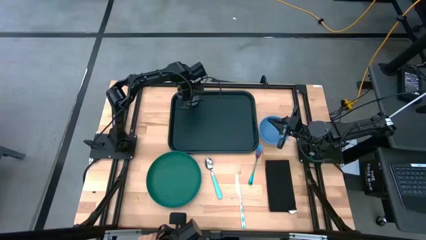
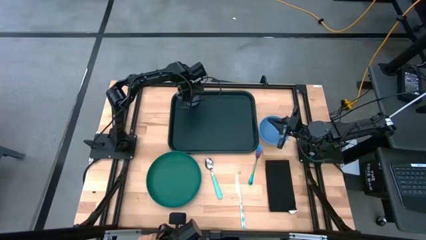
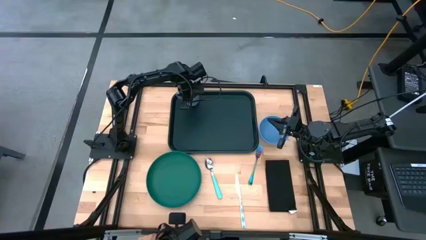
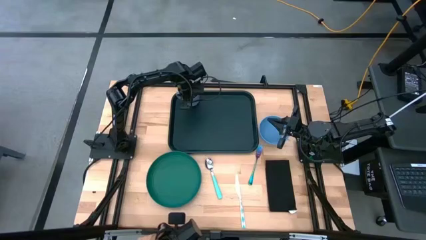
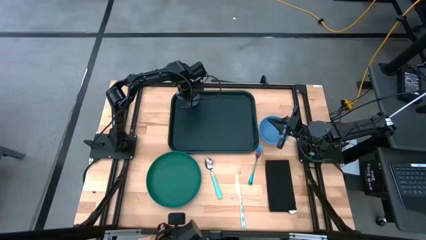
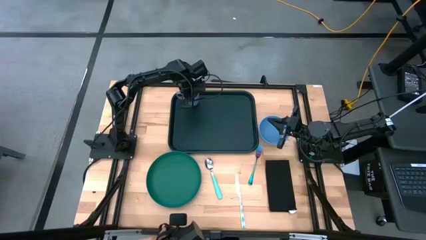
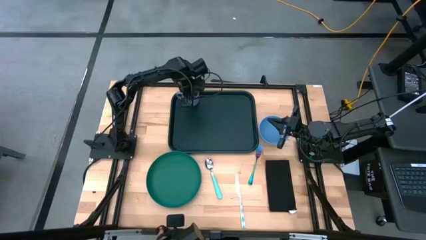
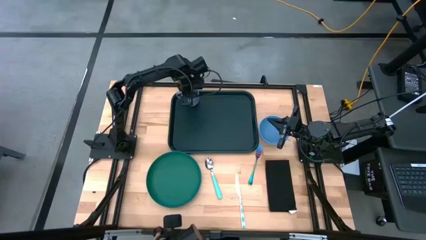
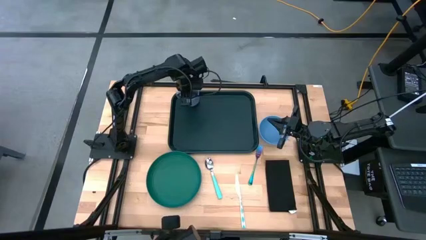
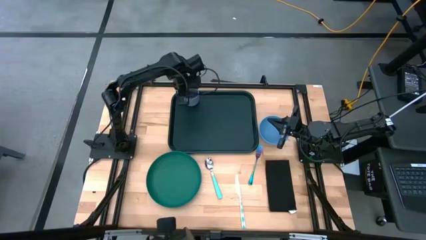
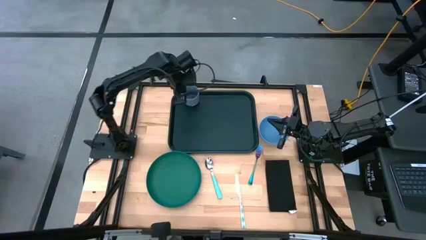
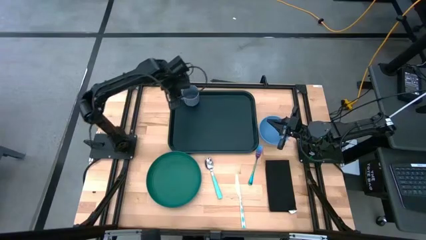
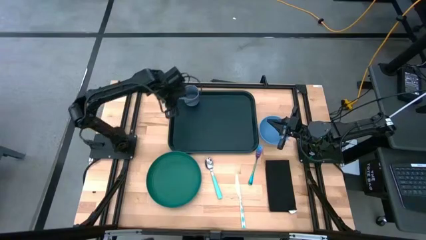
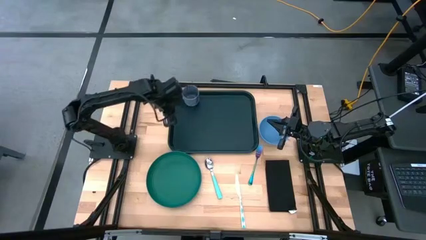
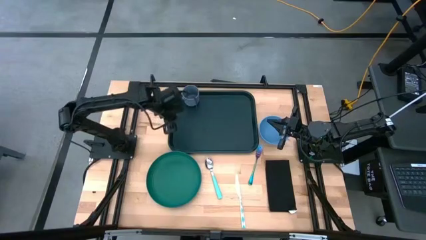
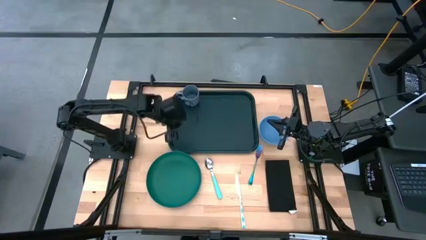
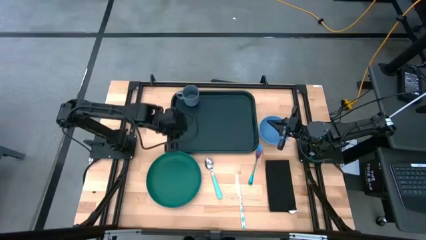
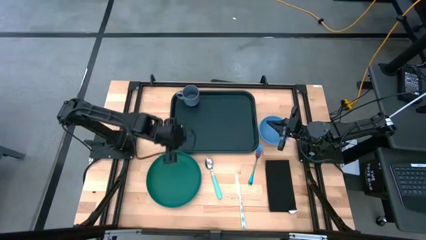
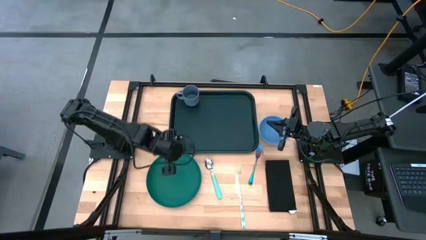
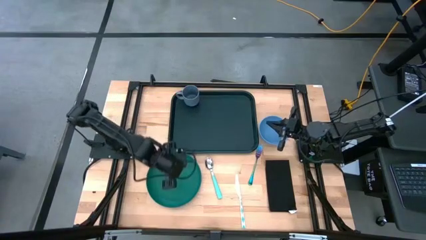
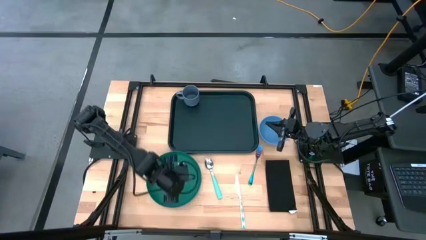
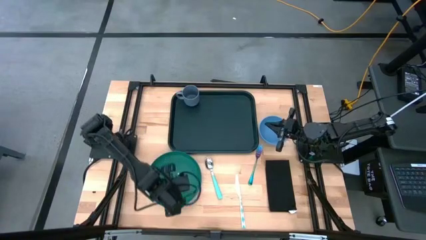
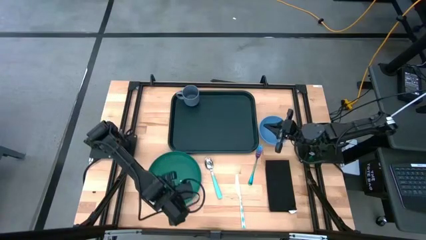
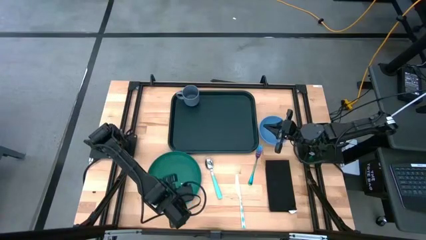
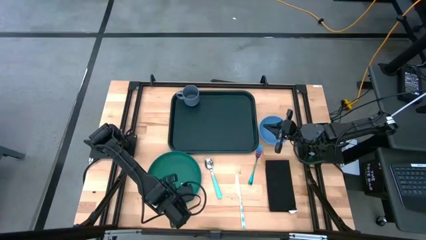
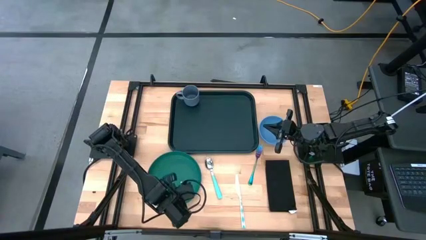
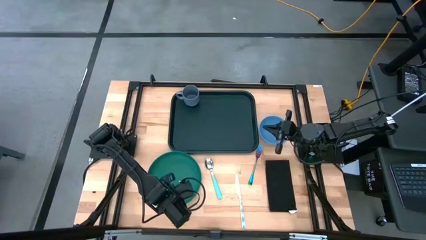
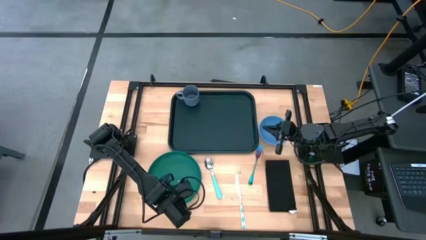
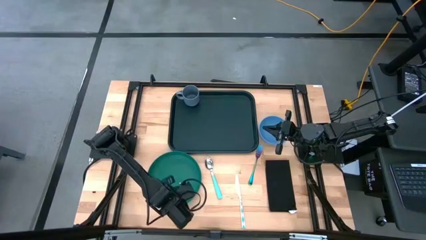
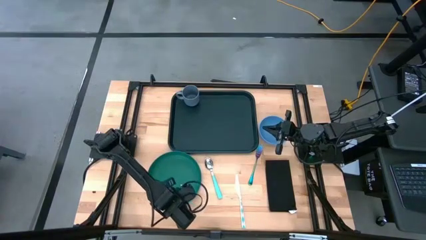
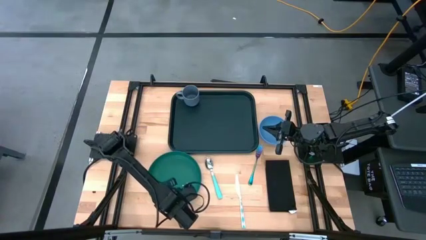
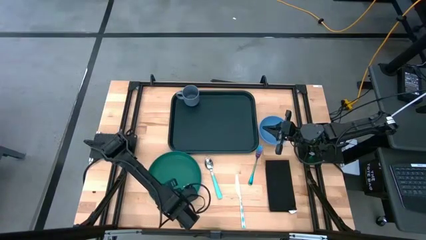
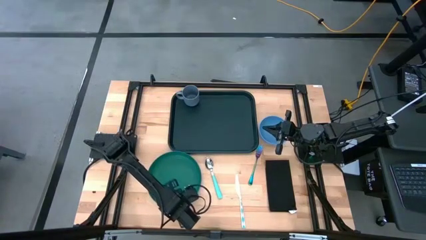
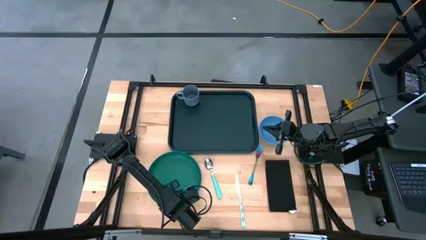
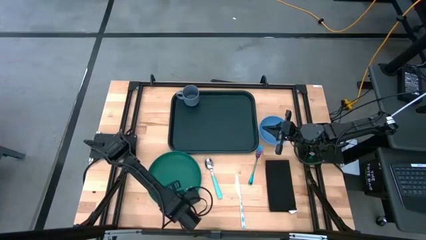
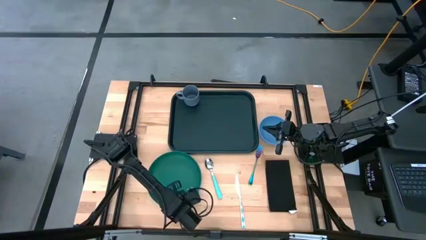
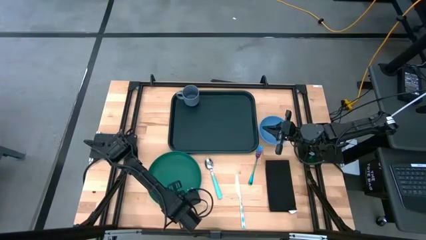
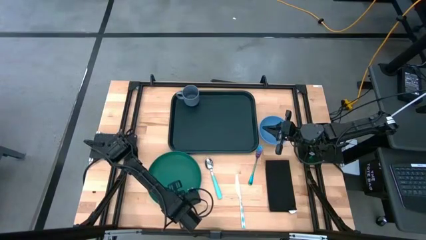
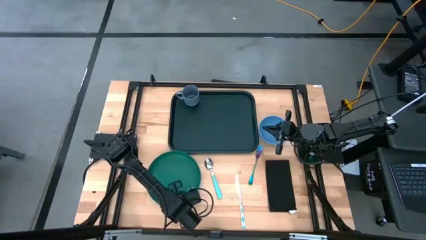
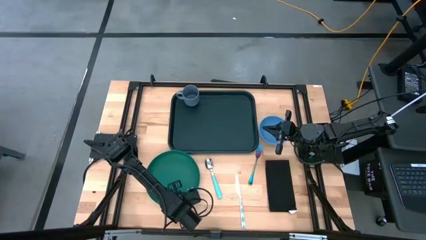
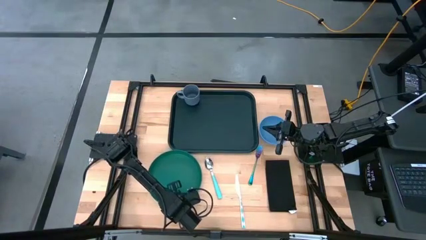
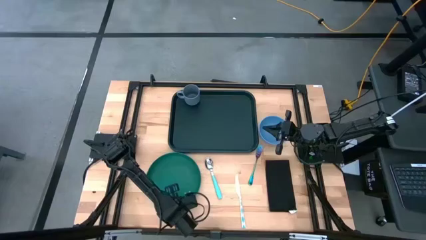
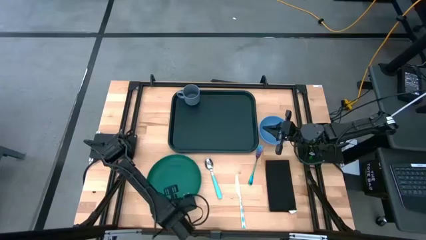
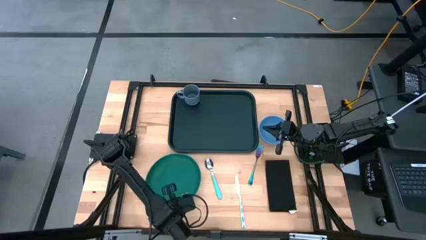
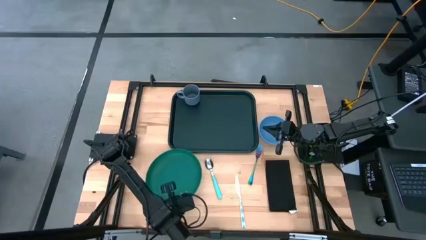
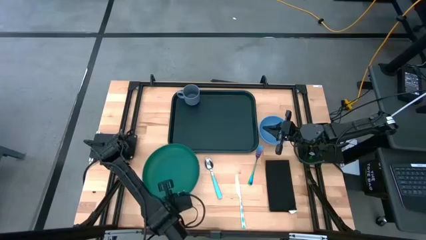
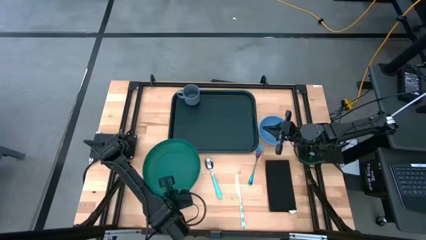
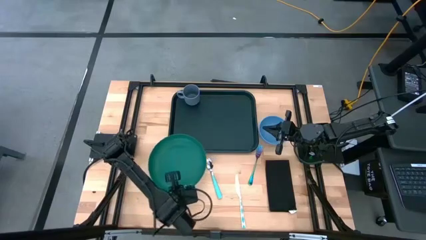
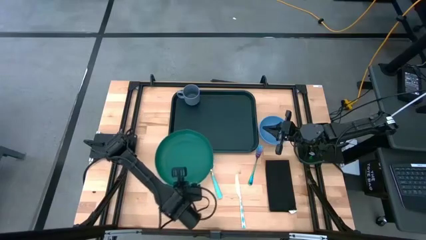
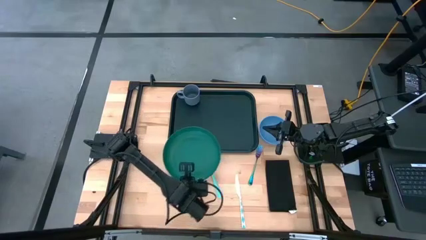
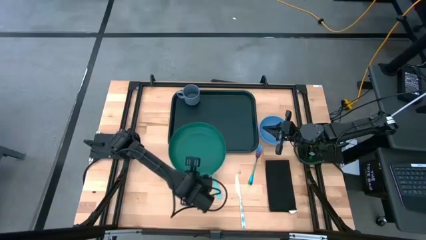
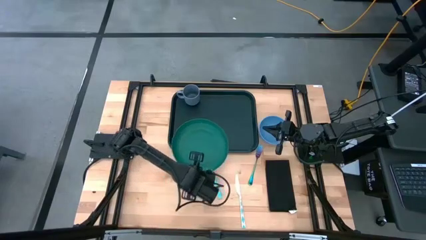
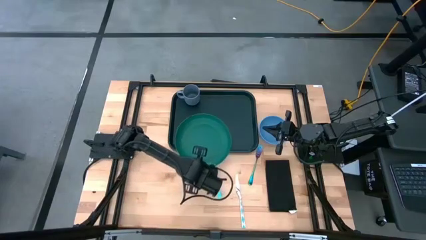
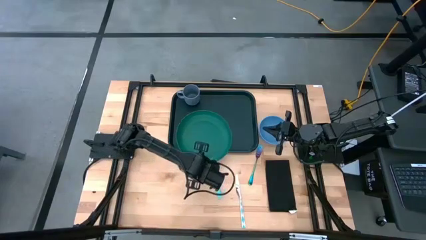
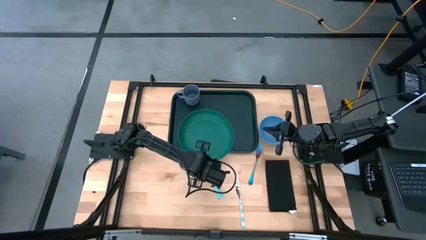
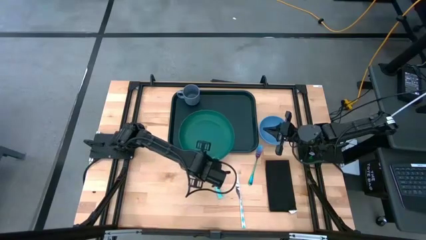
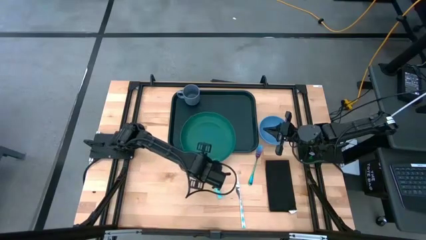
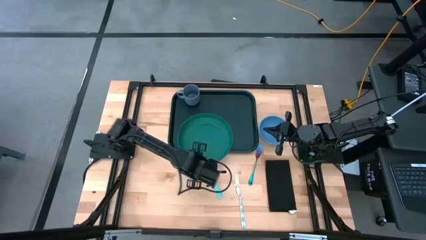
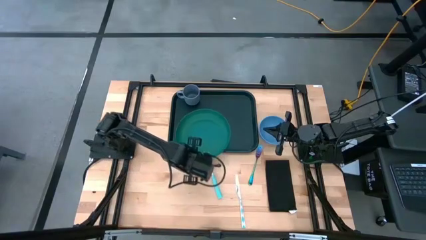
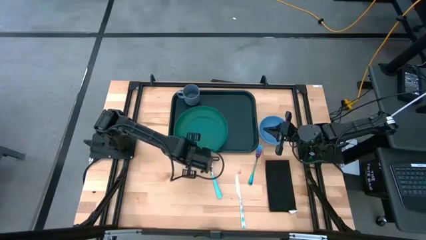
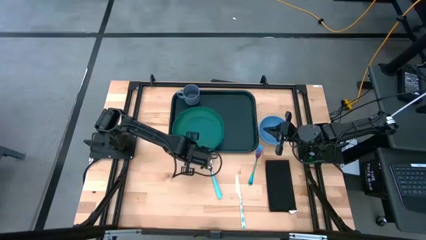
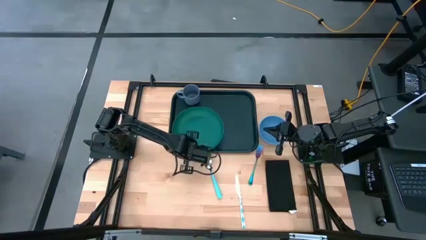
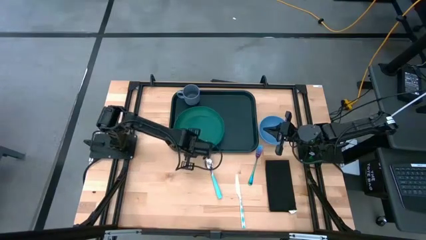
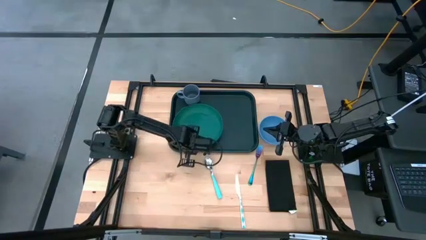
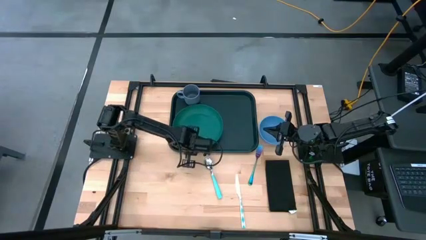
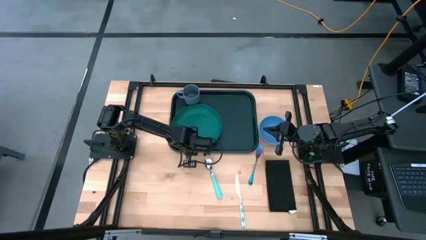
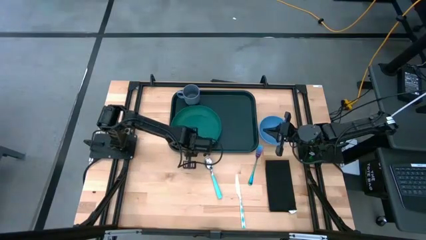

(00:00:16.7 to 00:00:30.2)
Task: Set up tray
Put the green plate in the bottom left of the black serving tray

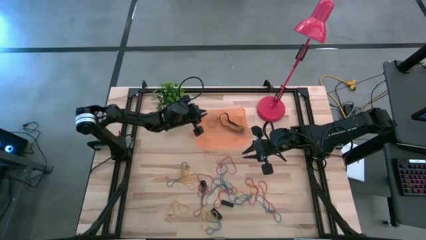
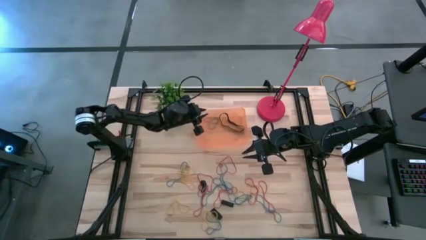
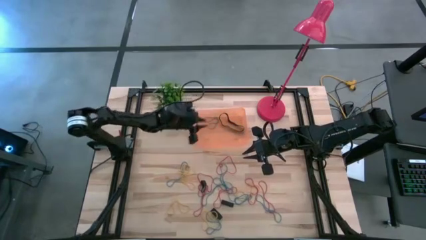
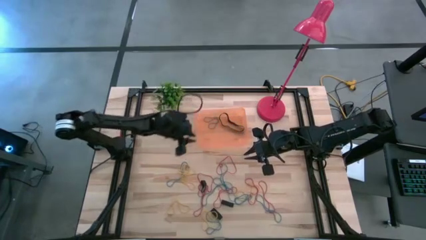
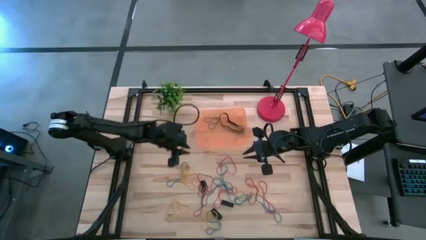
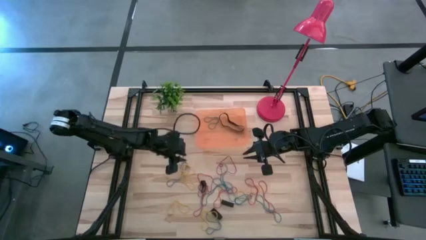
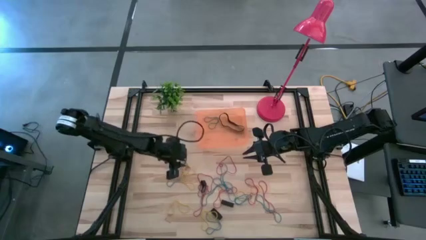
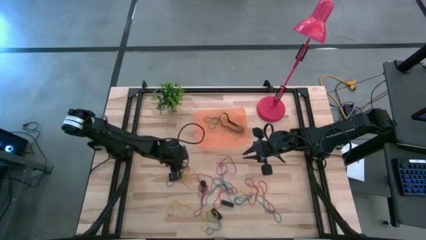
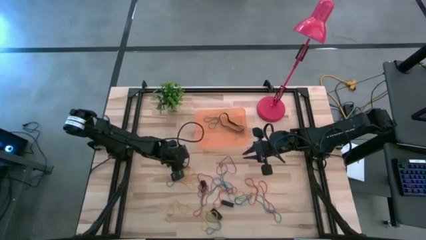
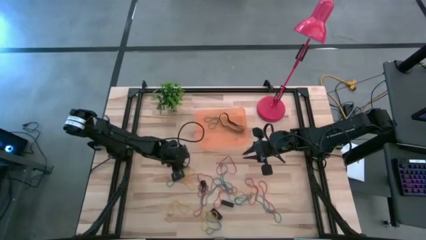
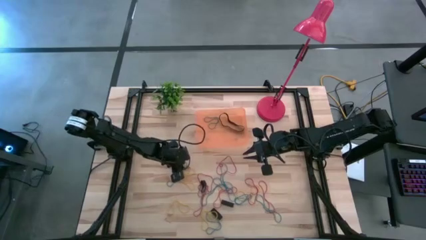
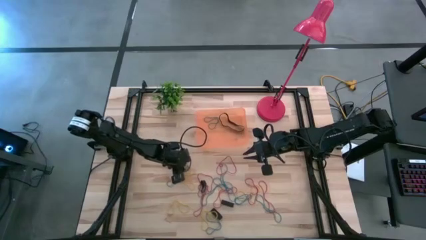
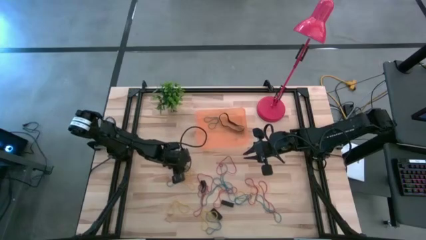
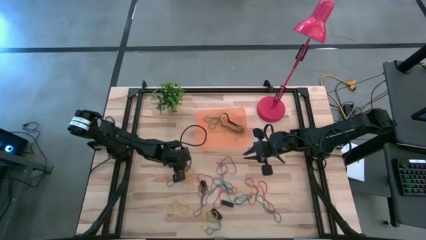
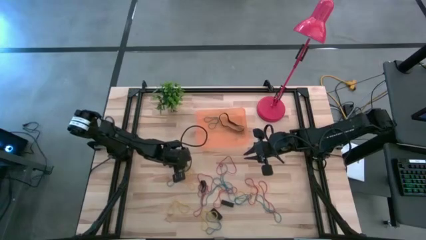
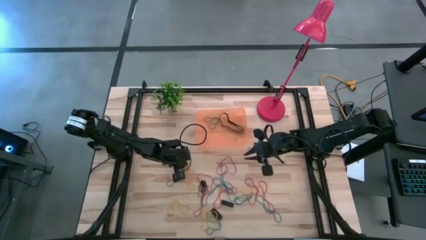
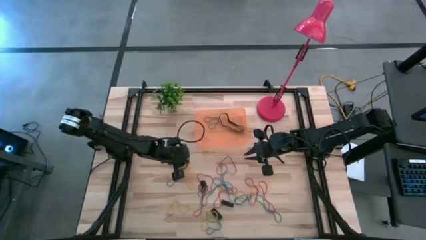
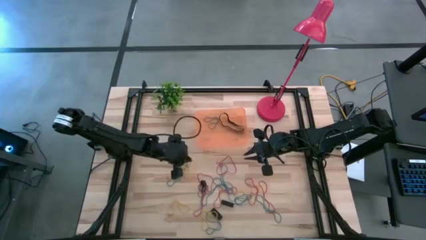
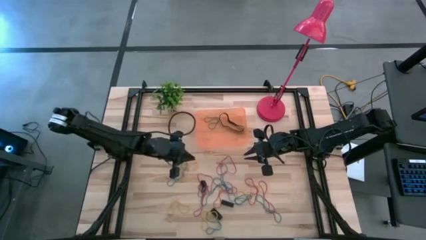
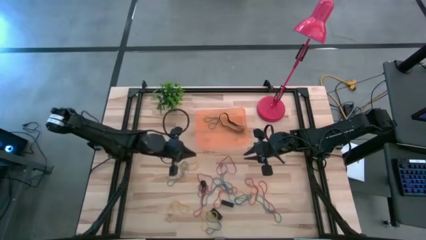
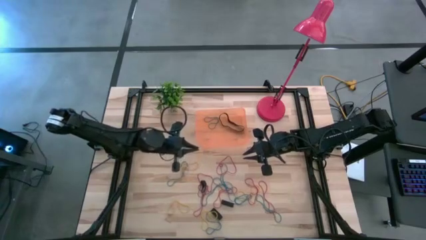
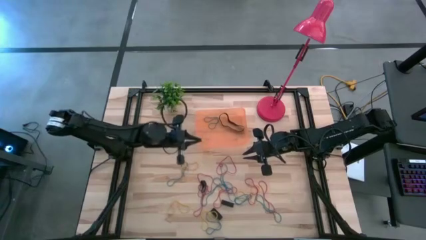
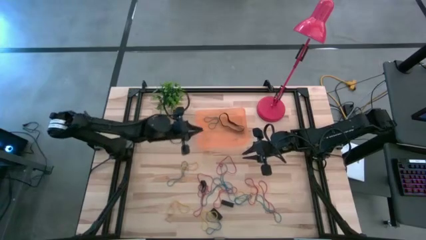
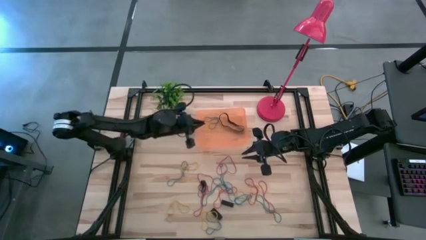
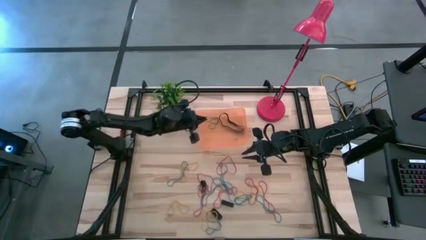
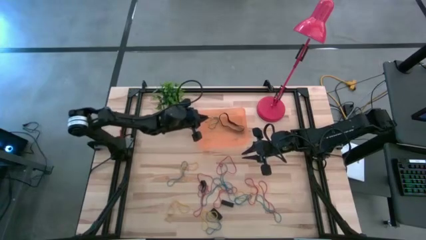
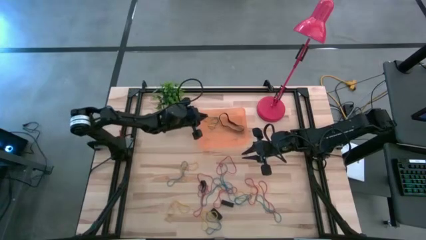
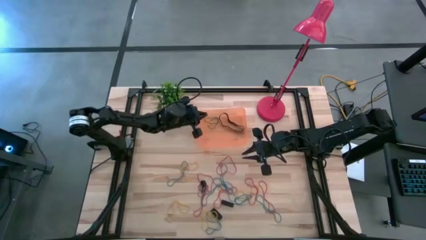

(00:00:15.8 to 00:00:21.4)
Task: Pick and place rubber bands into bin
Put the yellow rubber band into the orange bin
